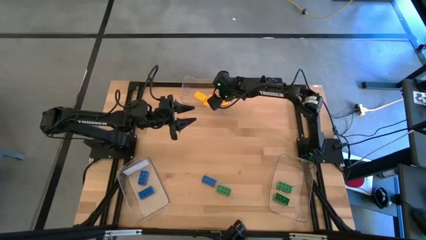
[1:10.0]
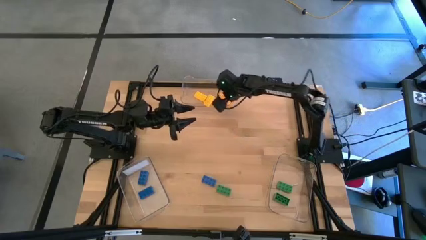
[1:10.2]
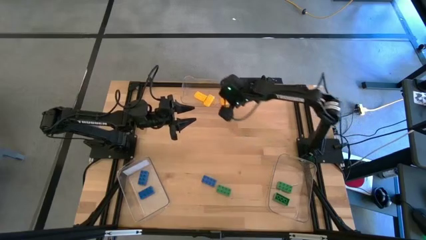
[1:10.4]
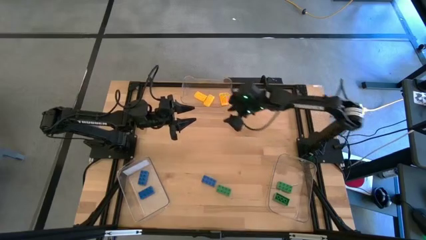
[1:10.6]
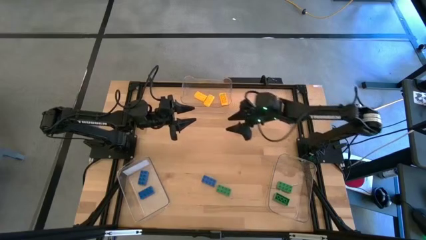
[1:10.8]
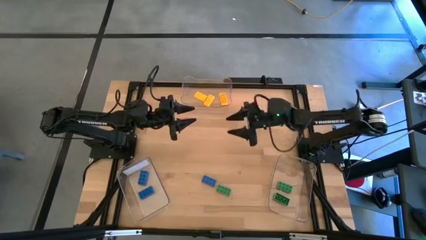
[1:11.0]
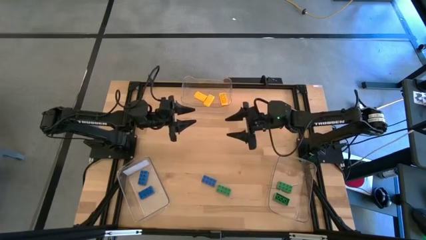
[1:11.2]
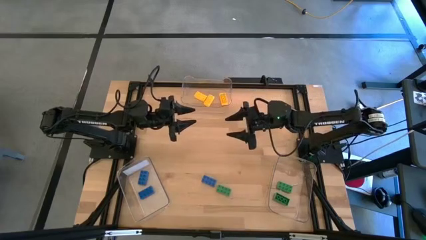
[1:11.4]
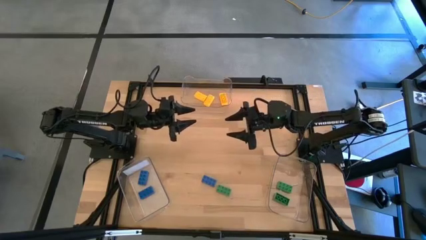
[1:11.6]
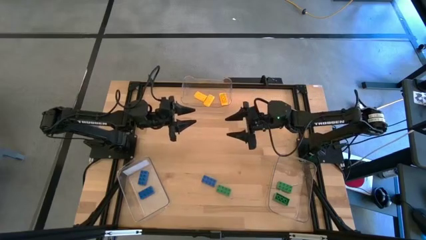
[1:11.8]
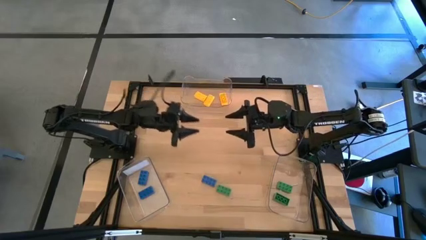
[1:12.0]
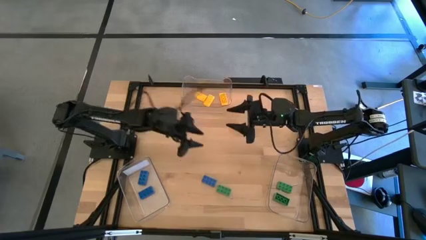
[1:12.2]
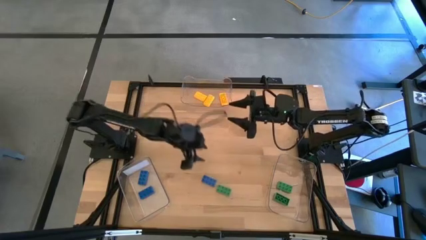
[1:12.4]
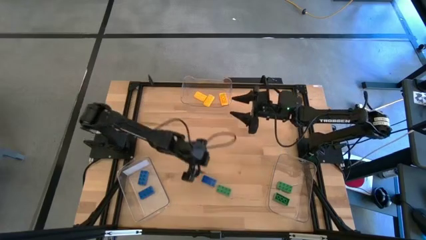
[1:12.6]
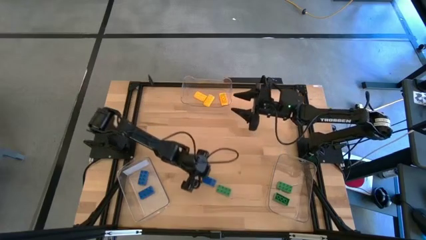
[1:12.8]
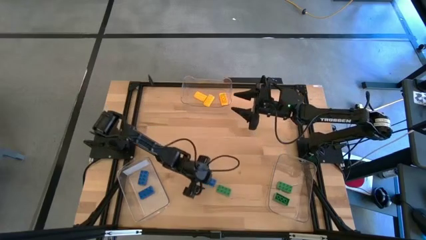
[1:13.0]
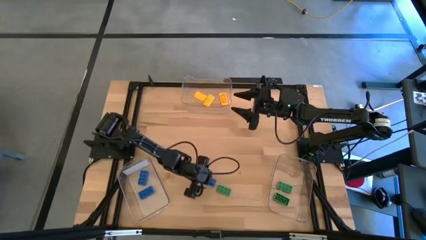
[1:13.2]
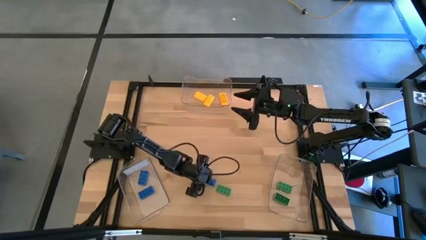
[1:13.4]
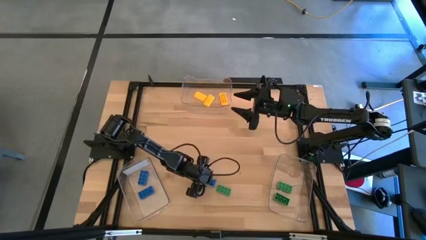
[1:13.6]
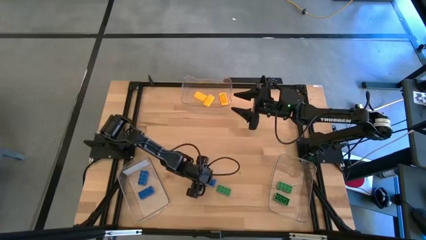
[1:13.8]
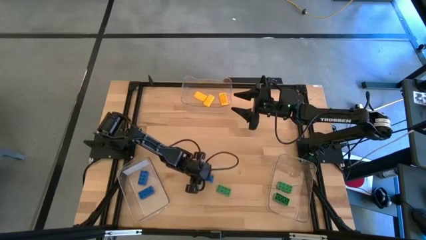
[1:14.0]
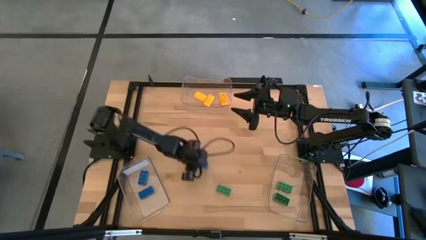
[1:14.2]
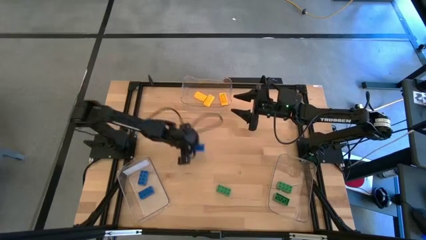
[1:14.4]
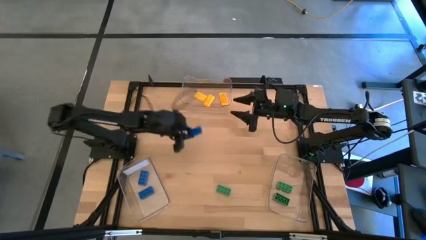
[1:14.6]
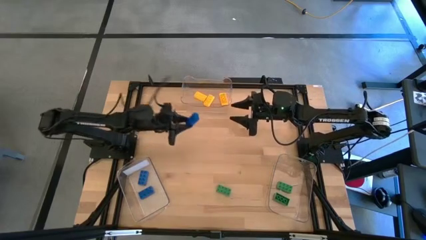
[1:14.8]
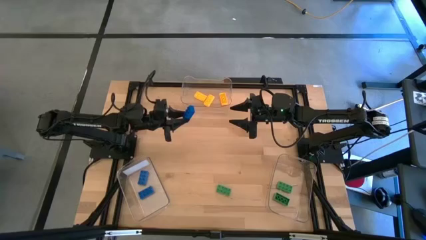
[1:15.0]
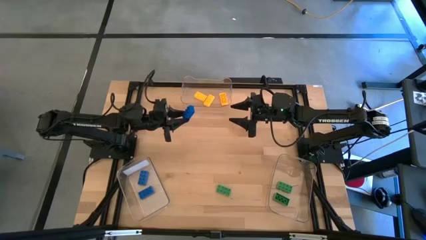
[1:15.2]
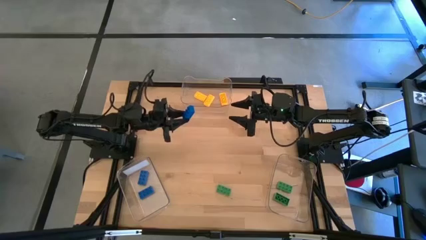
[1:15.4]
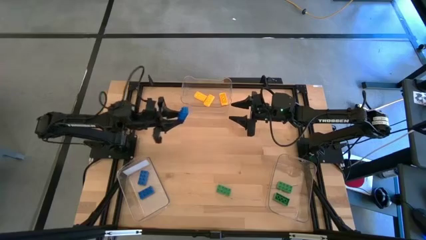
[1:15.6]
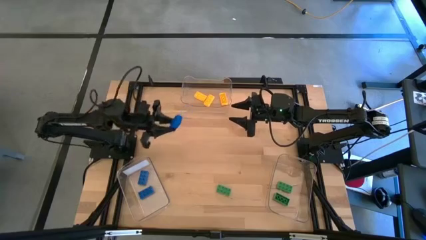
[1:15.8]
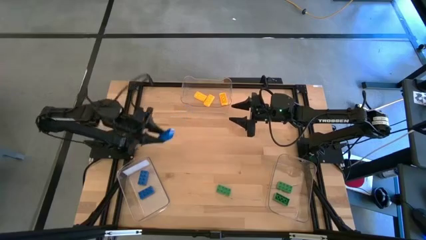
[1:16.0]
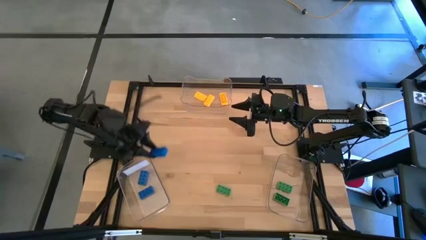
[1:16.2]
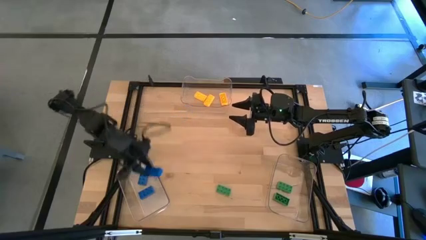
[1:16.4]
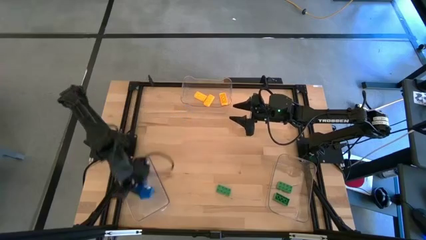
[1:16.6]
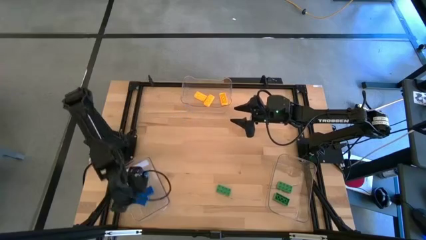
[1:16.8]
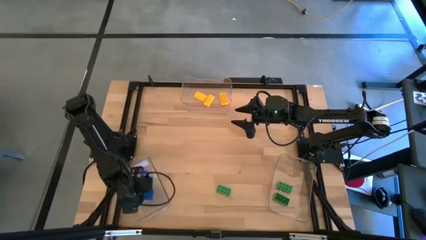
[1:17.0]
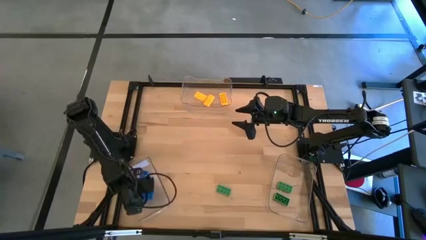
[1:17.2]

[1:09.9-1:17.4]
Task: Sort & place blocks by color
Put the blue game piece into the bottom left transparent bin

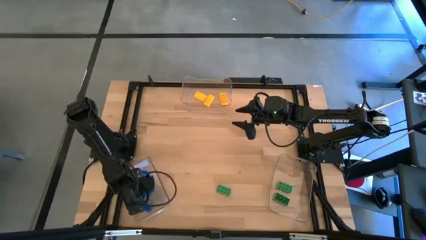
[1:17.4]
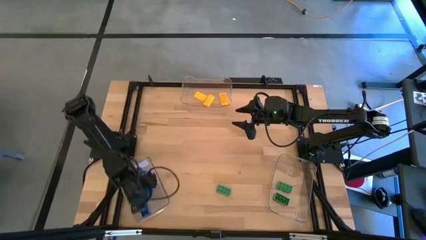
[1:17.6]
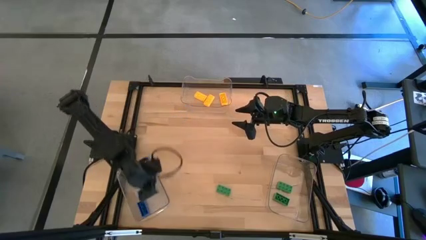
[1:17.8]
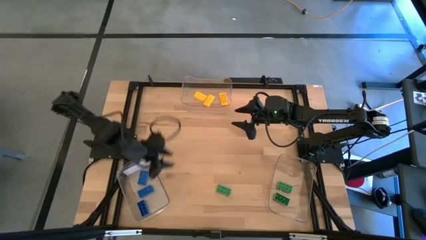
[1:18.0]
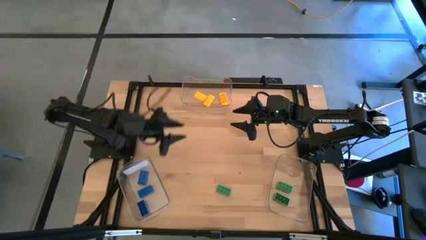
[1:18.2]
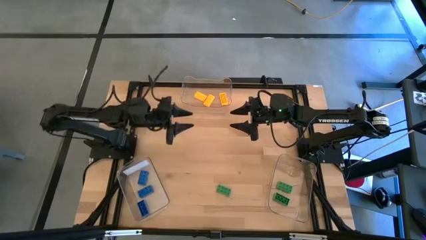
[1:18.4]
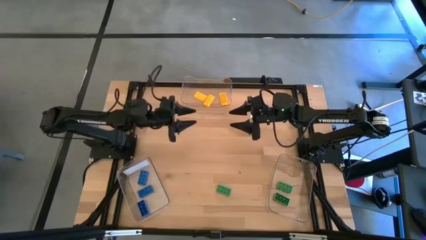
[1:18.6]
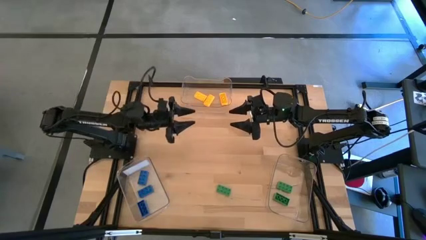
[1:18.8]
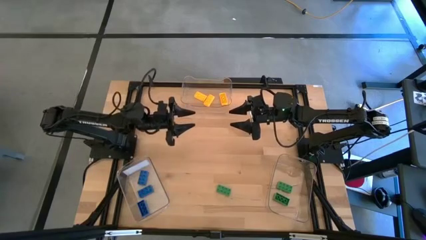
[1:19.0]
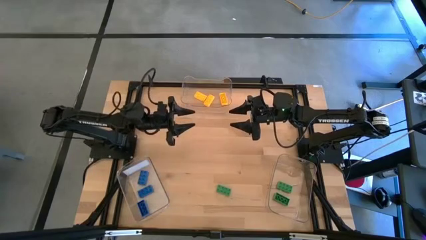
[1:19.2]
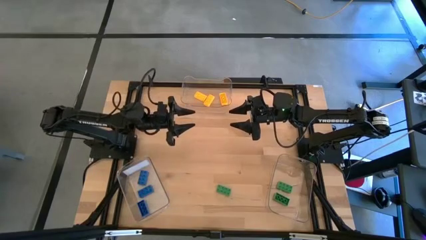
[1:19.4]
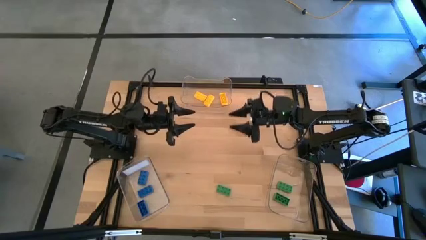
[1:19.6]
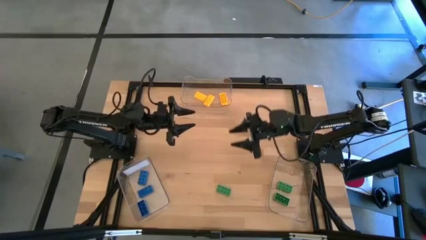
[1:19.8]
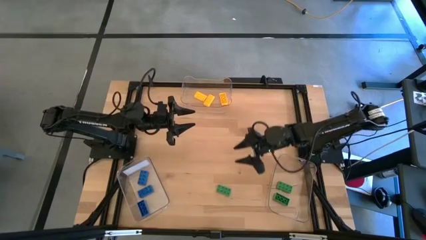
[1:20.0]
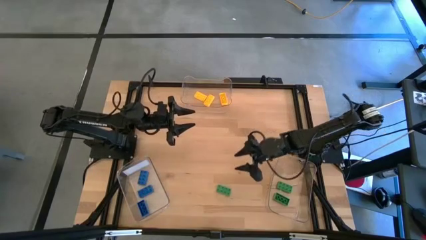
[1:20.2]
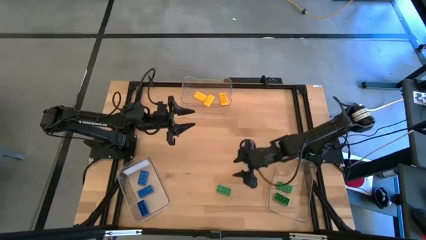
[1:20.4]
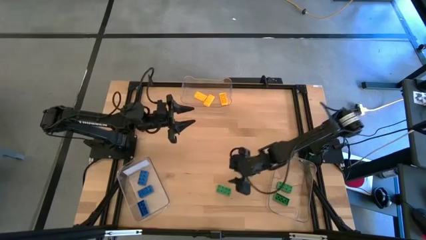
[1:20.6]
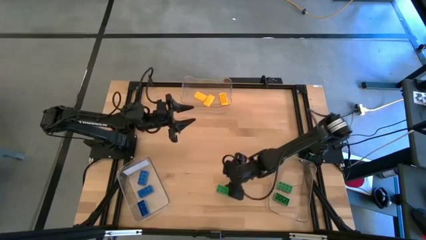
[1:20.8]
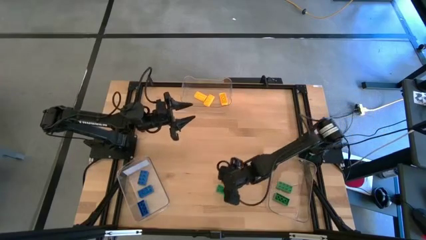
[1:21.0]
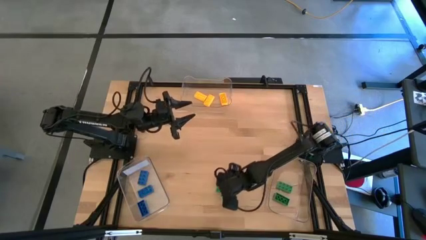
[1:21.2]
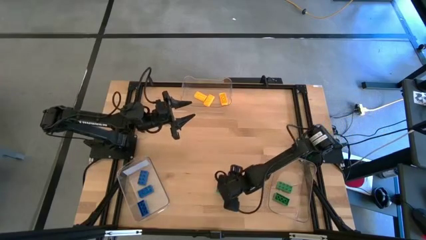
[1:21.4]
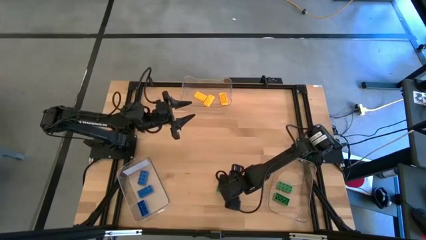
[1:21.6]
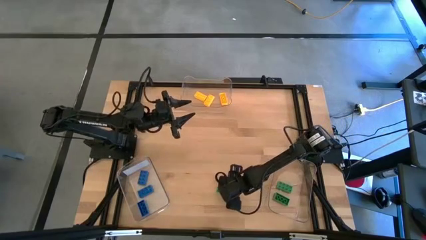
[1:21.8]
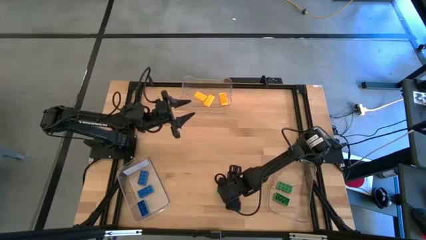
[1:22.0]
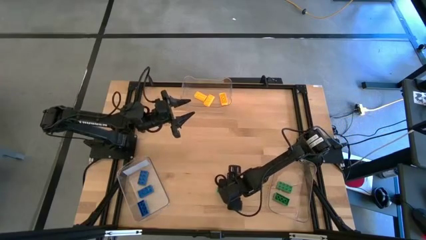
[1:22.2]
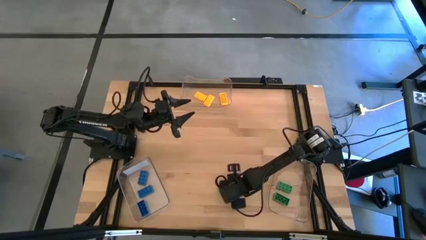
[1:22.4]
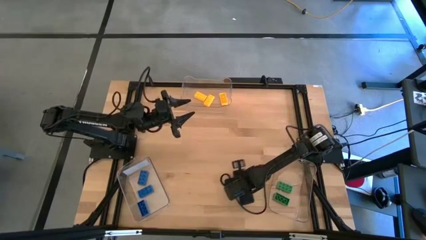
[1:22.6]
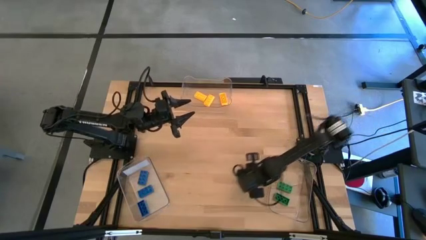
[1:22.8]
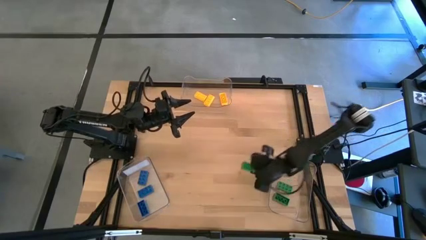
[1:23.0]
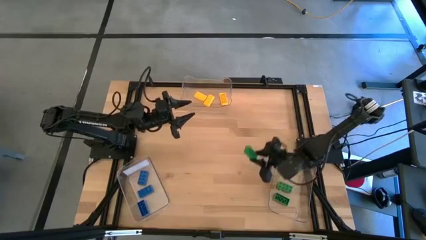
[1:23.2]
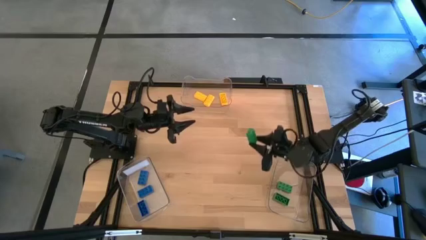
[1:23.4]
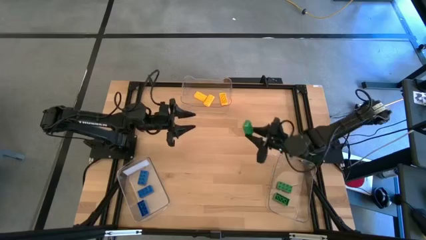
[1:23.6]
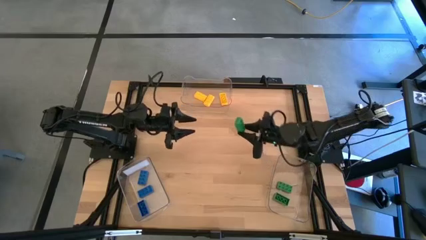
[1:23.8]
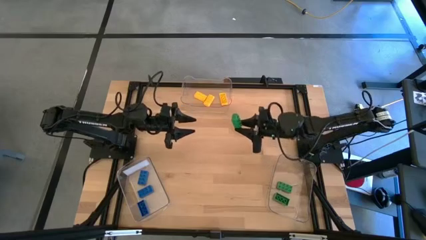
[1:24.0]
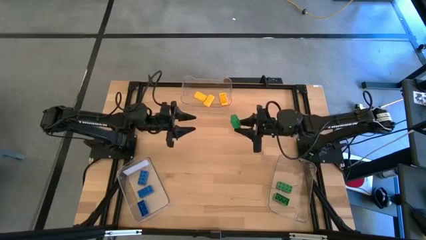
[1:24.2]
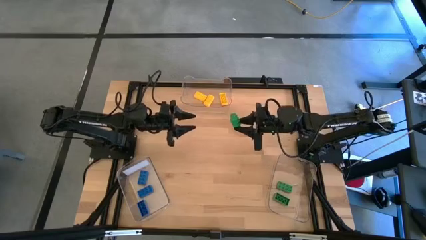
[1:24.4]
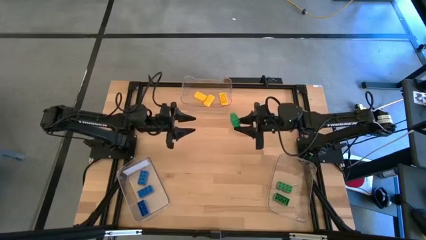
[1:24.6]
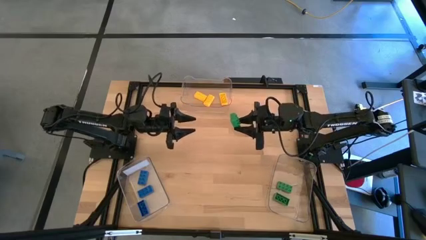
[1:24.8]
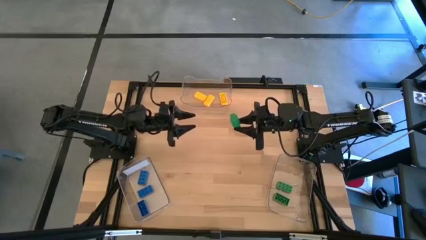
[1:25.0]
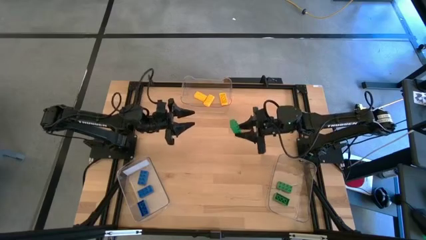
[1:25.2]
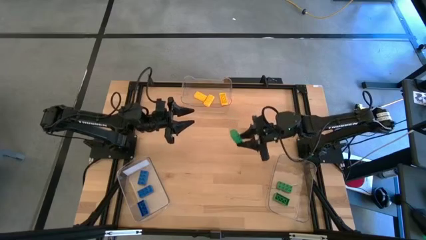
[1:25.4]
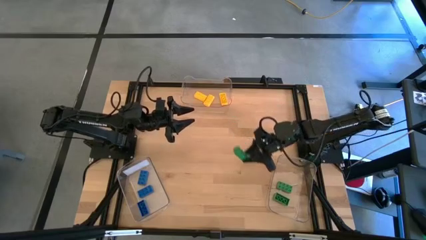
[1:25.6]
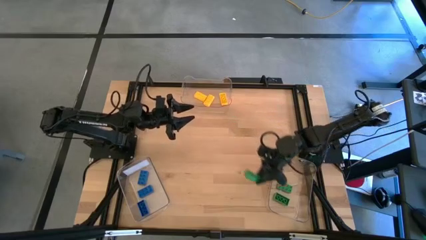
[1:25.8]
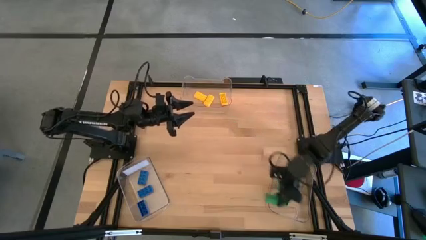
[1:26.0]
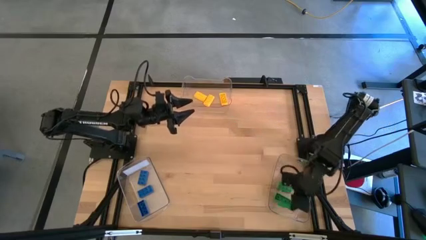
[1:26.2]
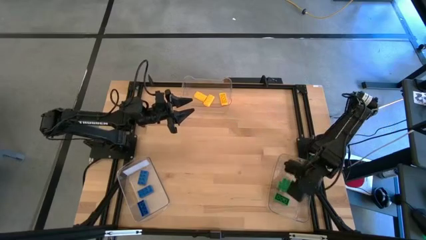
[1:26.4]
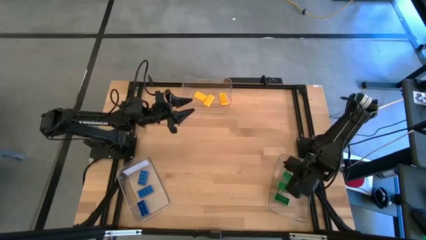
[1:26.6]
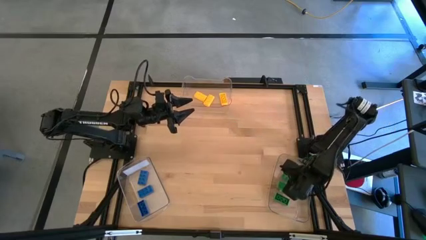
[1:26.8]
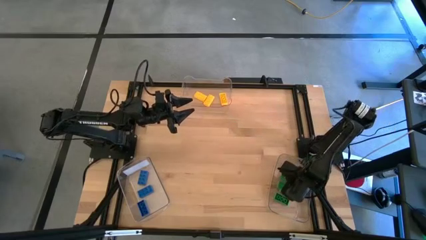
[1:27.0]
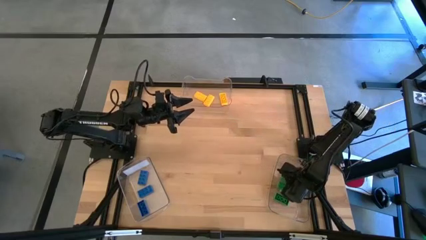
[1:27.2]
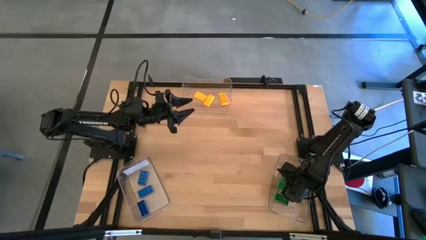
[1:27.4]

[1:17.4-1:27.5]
Put the green game piece into the bottom right transparent bin
